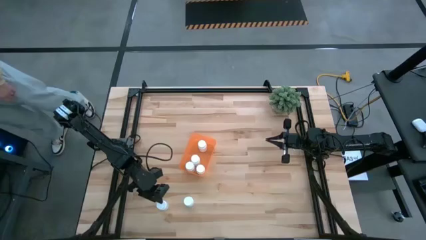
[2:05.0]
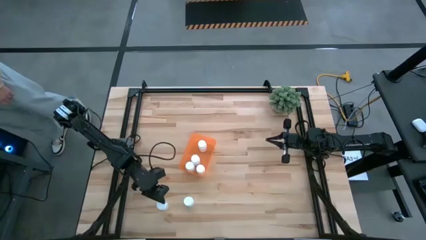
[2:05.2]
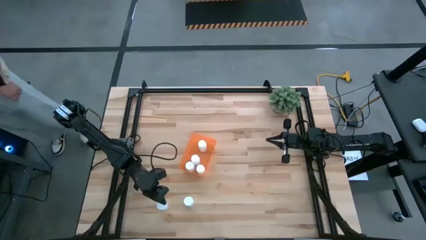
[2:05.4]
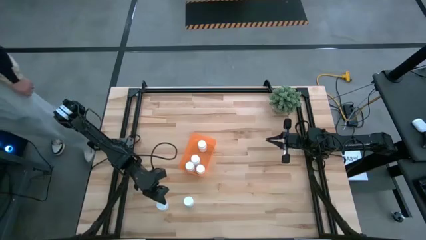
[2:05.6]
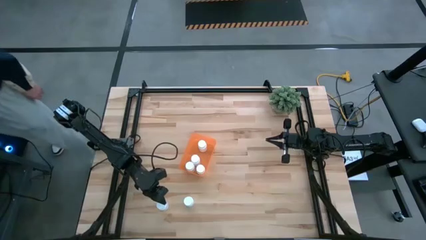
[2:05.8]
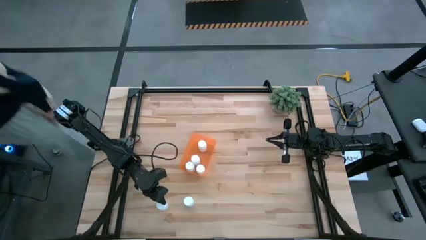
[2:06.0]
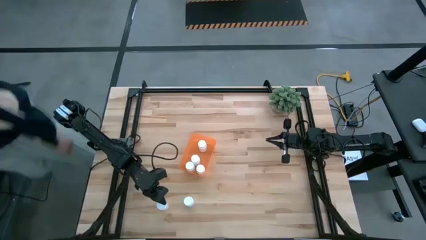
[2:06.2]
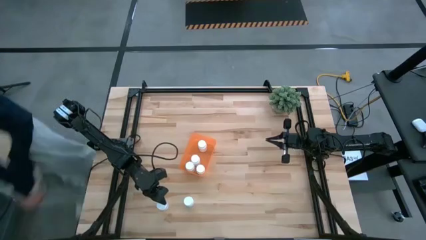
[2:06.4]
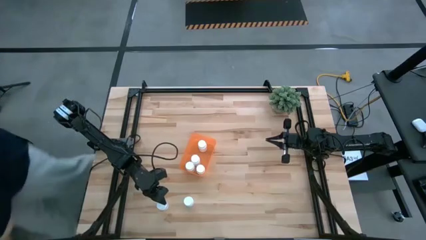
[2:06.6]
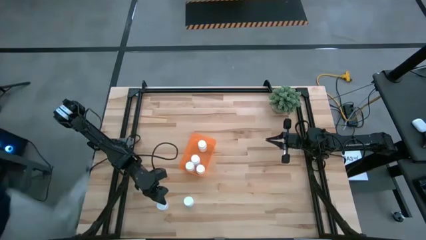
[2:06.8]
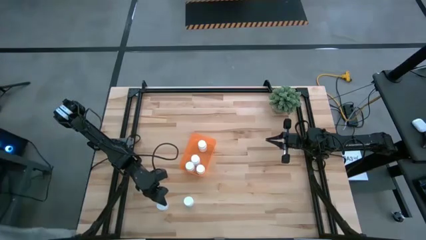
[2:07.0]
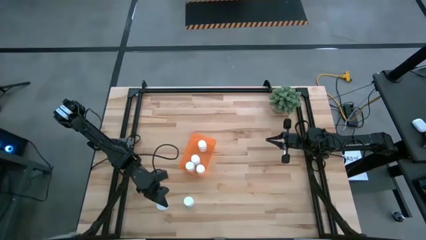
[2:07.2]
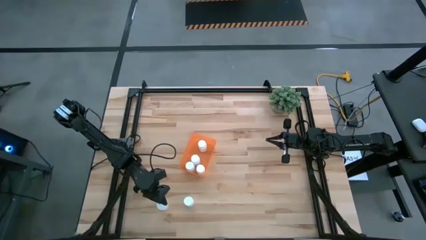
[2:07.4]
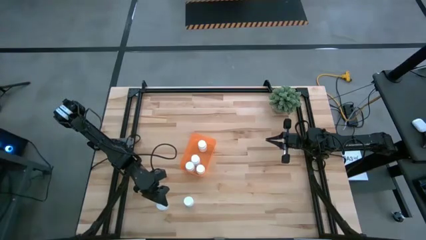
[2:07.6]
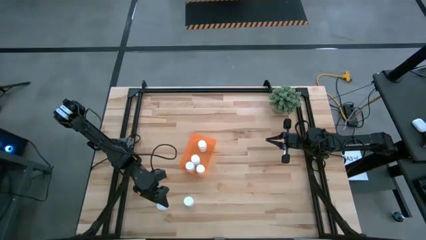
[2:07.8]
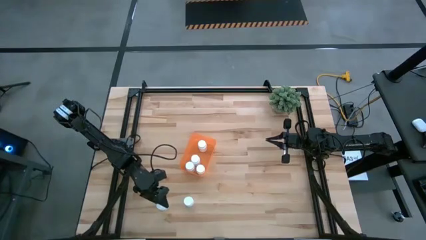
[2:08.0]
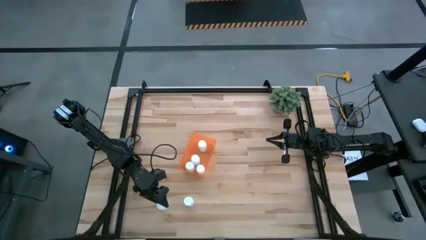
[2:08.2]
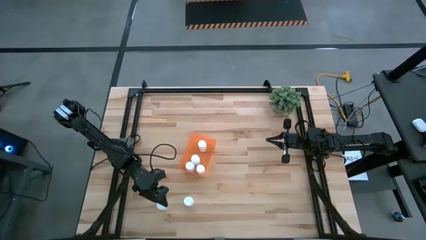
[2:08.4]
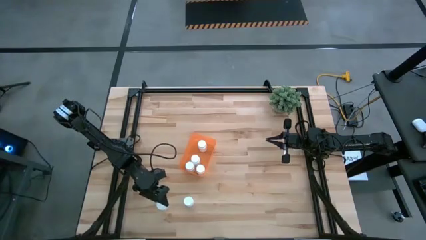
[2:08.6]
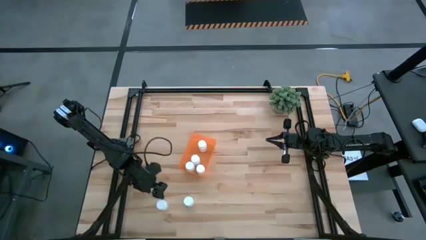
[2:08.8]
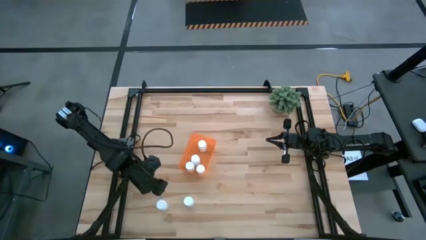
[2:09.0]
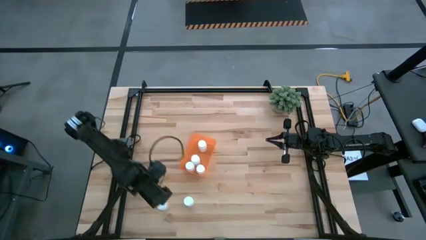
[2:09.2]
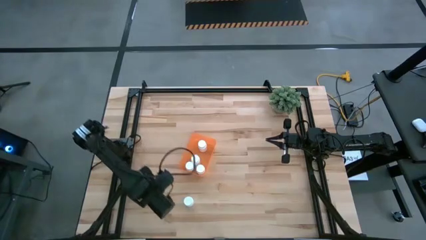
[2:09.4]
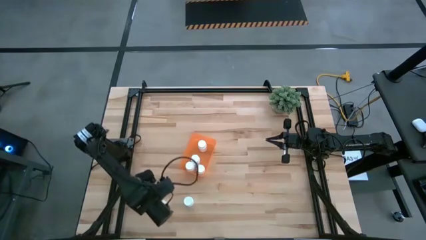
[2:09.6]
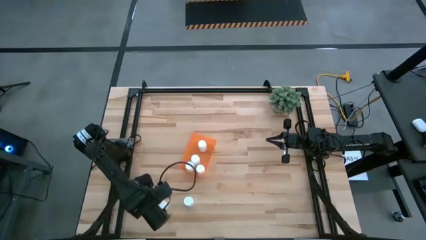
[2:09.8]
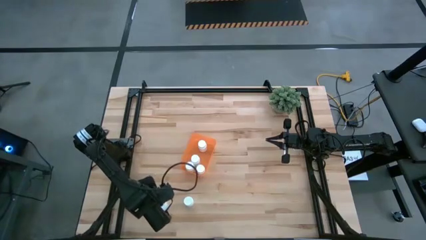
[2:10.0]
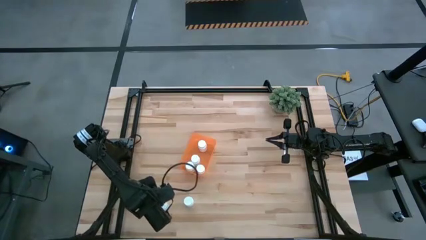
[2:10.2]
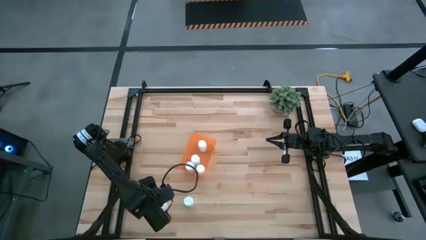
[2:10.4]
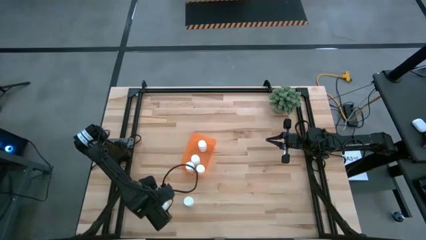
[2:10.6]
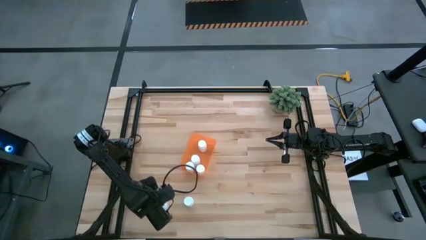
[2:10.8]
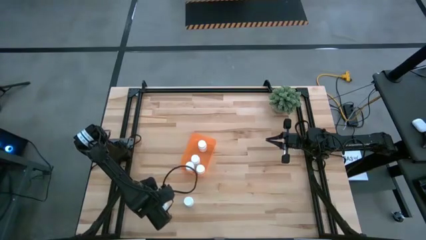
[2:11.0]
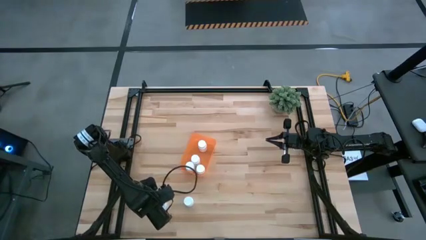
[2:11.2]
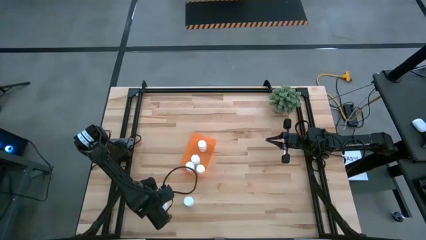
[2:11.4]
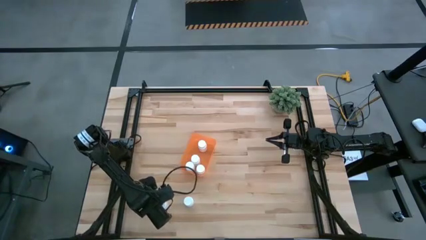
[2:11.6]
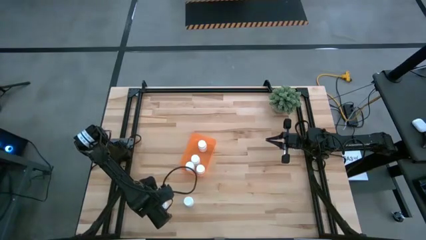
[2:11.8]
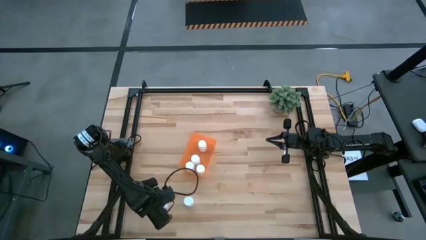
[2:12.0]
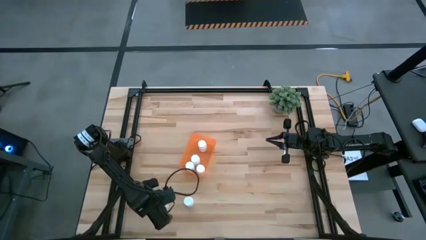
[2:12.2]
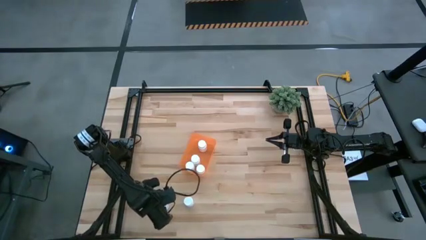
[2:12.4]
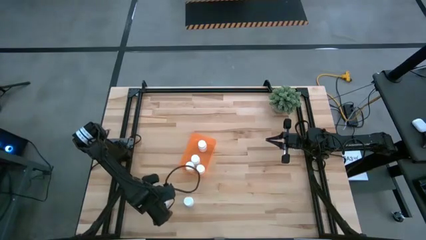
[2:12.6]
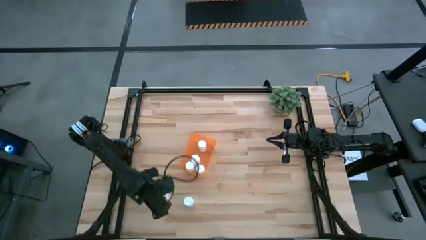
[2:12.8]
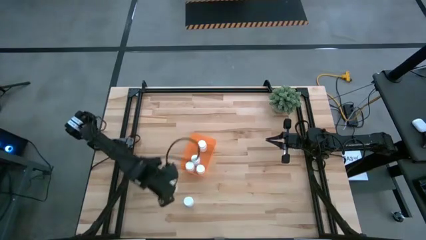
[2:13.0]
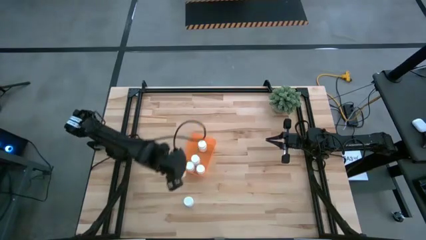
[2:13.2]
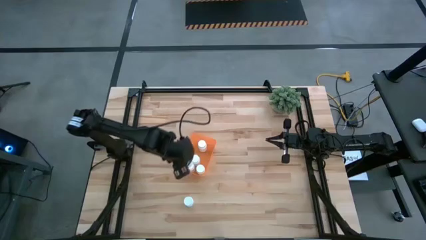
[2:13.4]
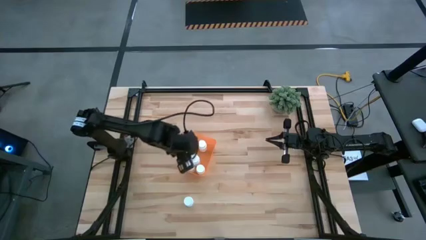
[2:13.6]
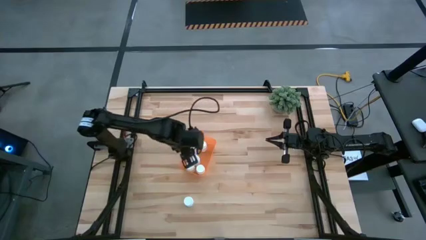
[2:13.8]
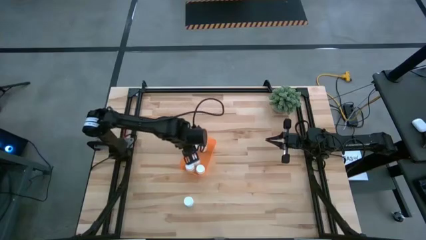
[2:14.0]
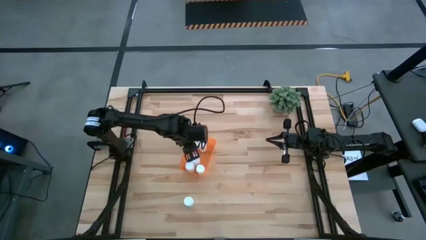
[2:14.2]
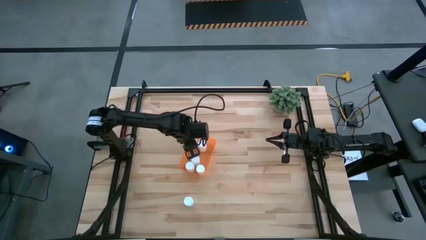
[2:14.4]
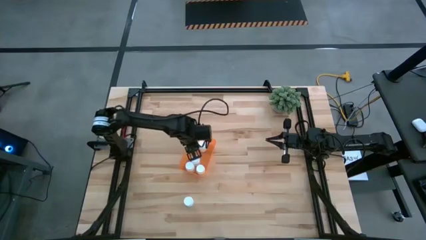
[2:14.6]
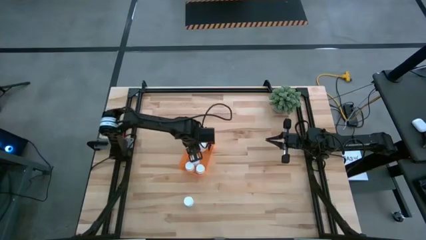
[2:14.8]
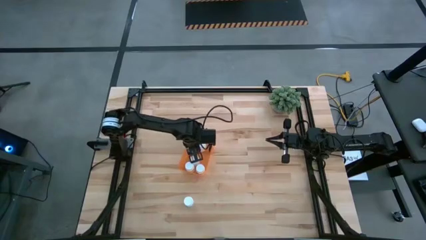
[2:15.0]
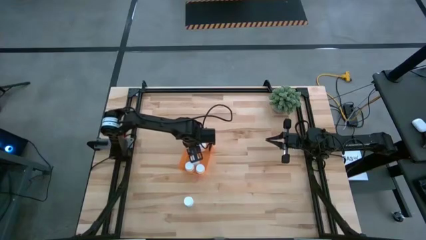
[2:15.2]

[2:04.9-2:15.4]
Task: Pick and place pill bottles into a basket
Put the left white medicine bottle into the orange bin

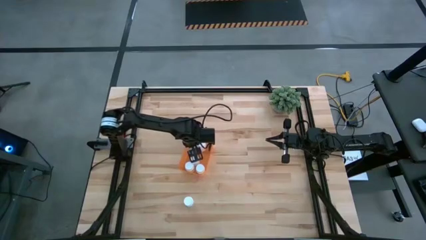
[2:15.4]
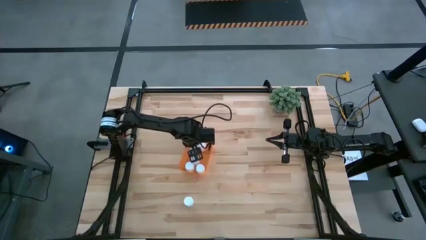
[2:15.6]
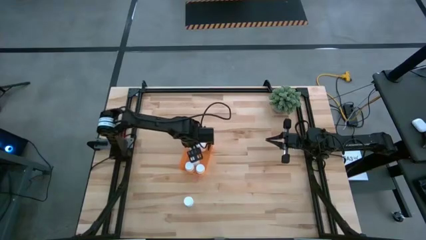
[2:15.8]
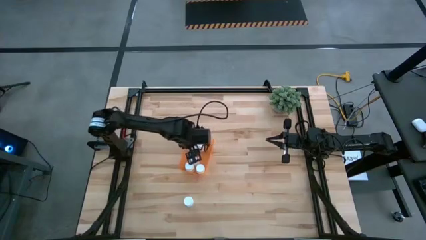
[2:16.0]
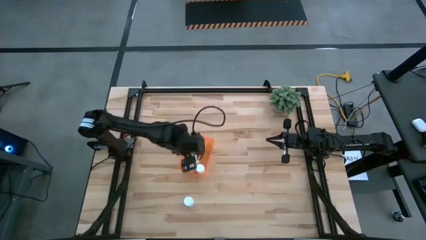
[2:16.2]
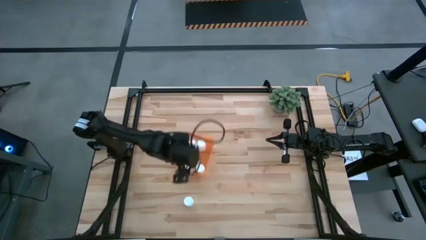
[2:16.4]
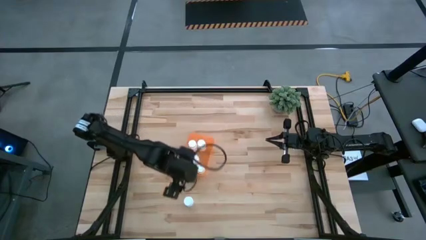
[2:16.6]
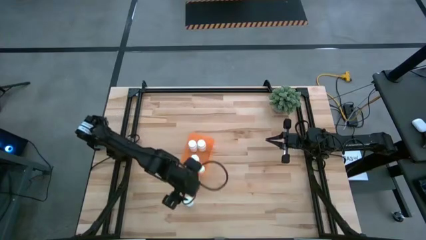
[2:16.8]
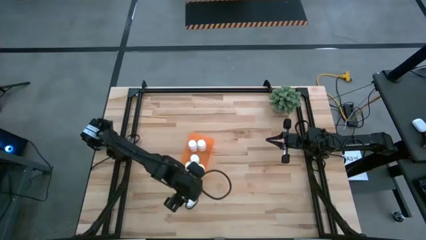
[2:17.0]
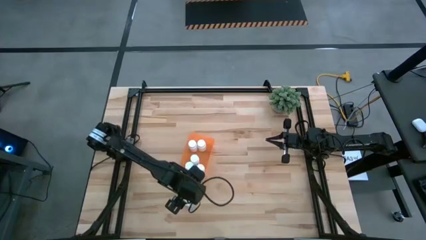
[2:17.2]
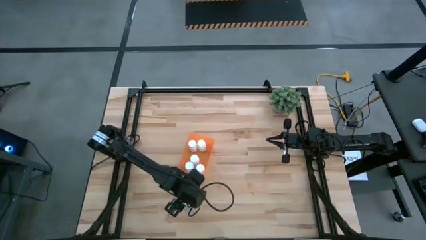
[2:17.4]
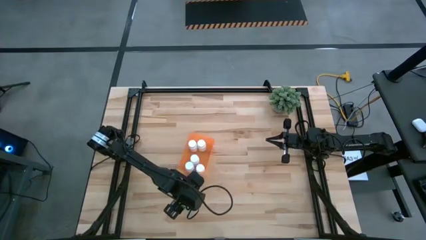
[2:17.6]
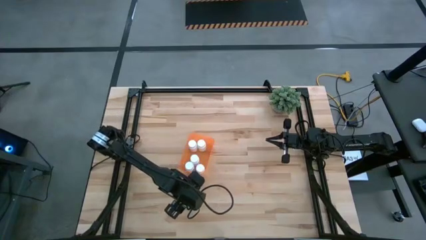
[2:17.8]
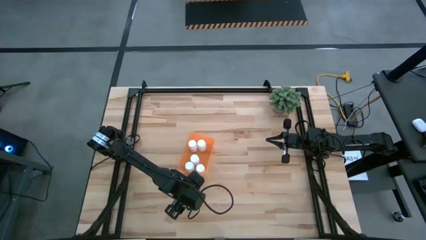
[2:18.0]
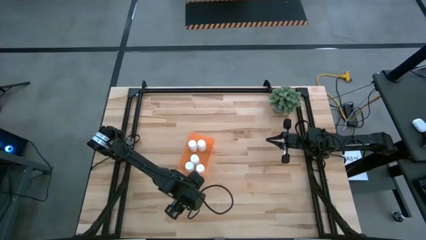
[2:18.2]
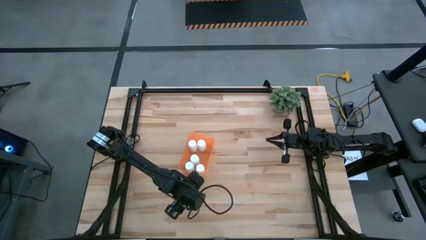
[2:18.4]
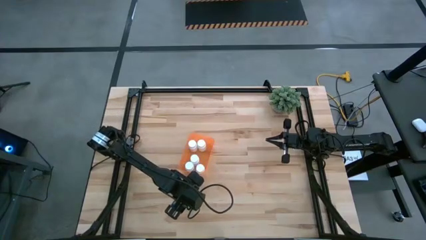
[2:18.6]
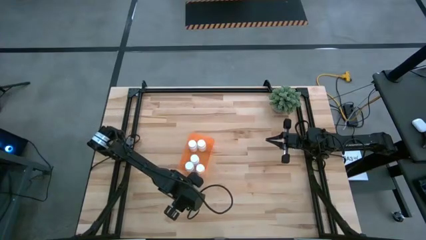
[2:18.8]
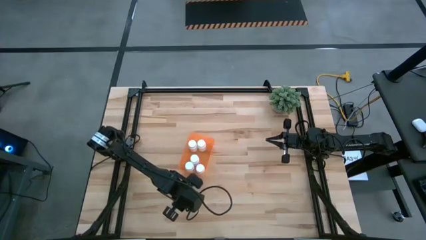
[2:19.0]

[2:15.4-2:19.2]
Put the white medicine bottle into the orange bin
